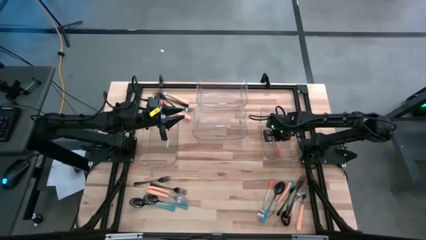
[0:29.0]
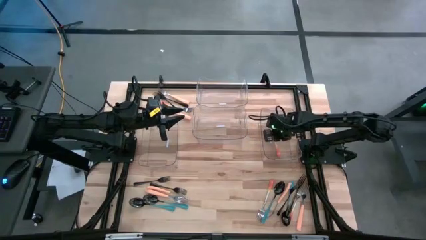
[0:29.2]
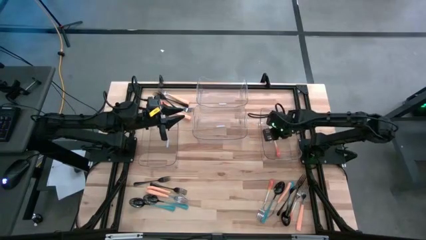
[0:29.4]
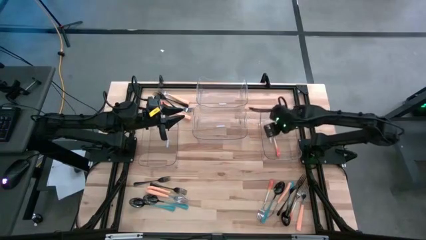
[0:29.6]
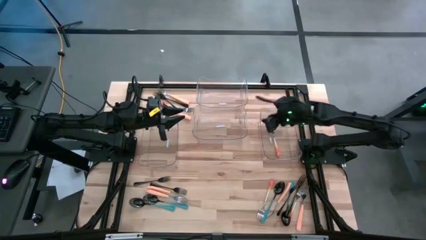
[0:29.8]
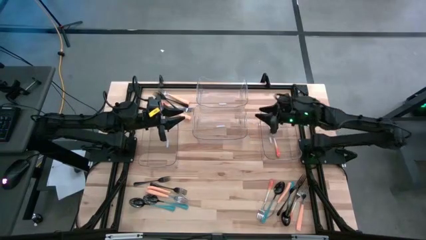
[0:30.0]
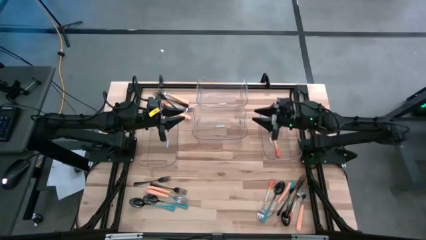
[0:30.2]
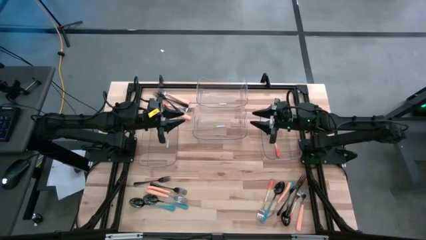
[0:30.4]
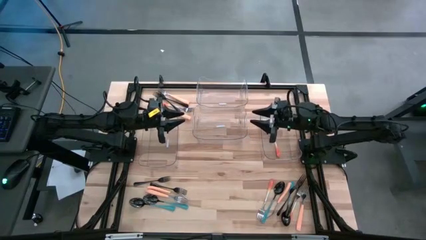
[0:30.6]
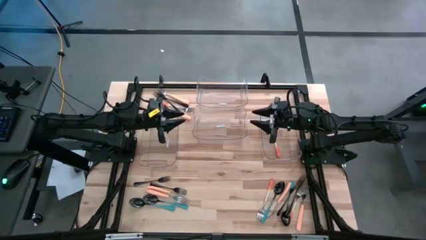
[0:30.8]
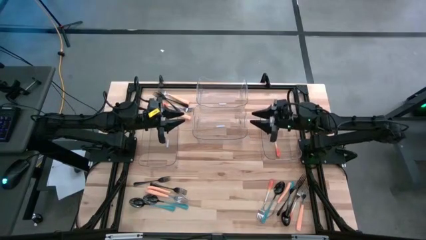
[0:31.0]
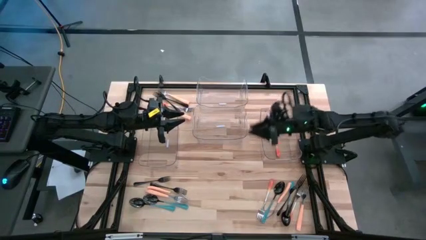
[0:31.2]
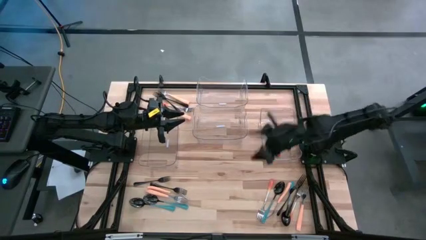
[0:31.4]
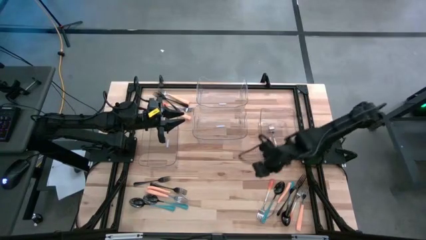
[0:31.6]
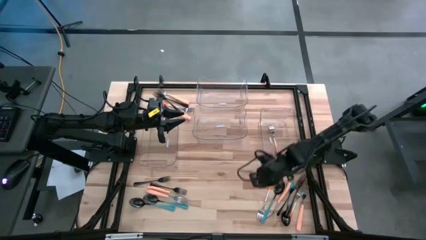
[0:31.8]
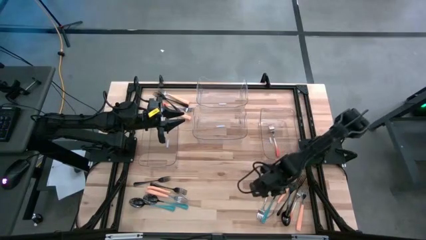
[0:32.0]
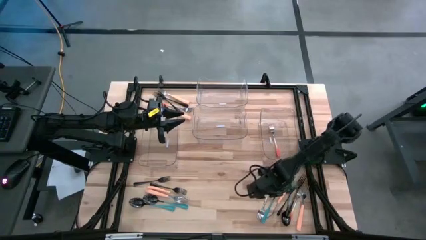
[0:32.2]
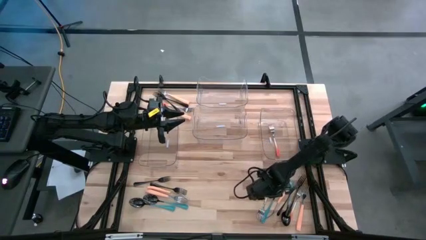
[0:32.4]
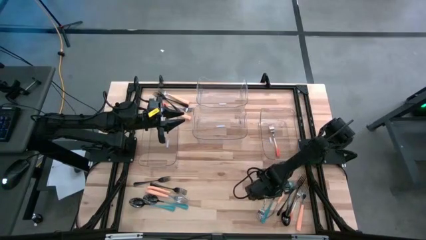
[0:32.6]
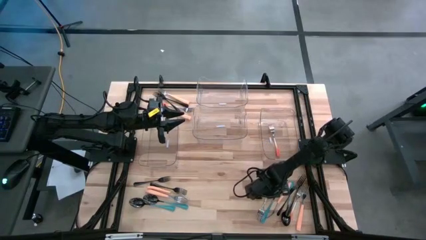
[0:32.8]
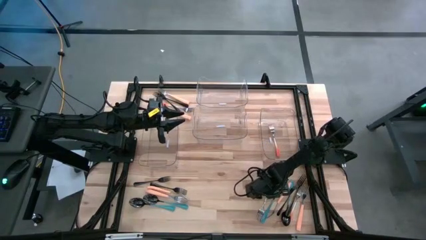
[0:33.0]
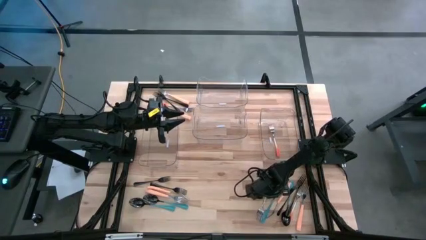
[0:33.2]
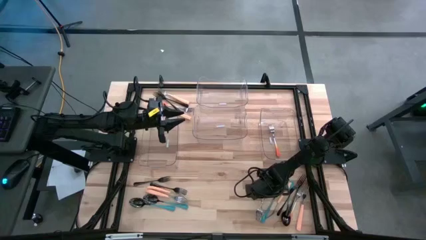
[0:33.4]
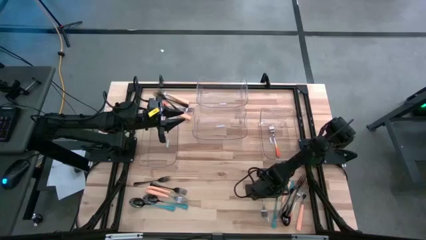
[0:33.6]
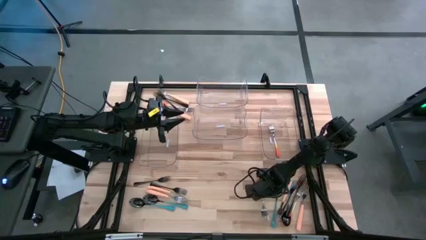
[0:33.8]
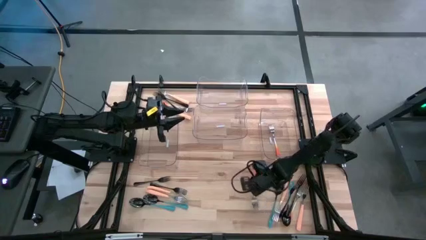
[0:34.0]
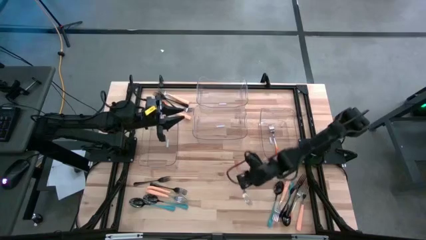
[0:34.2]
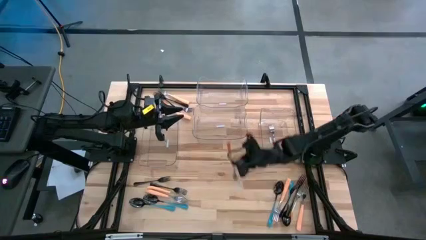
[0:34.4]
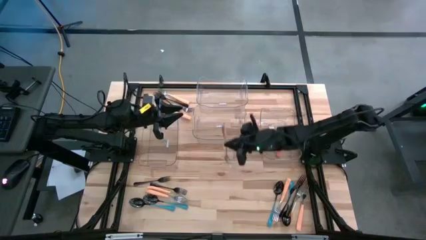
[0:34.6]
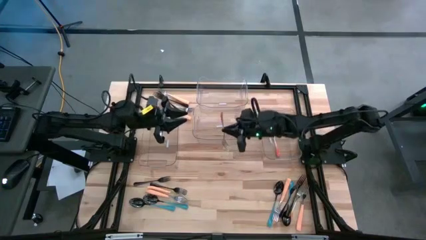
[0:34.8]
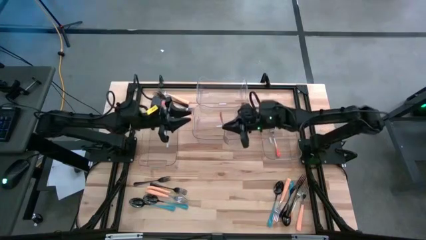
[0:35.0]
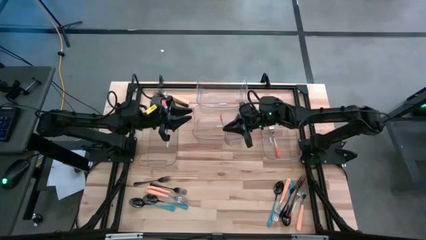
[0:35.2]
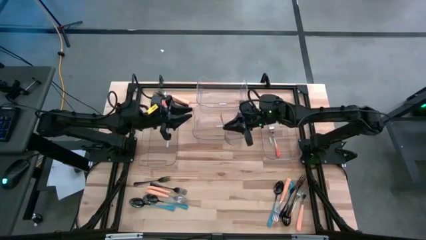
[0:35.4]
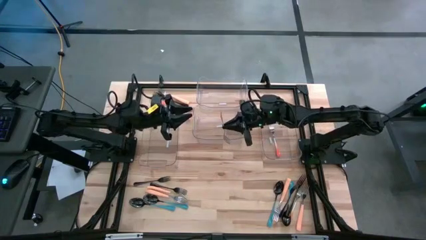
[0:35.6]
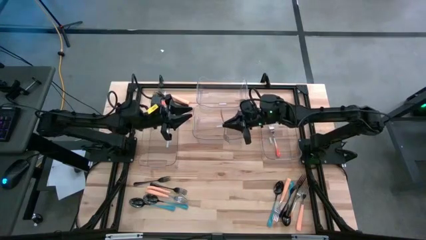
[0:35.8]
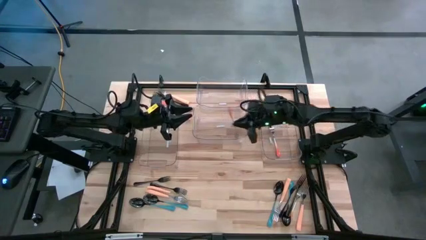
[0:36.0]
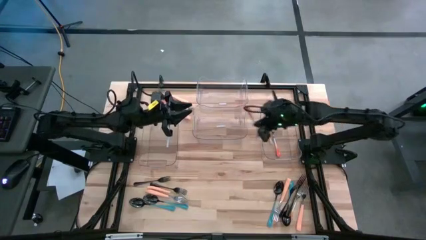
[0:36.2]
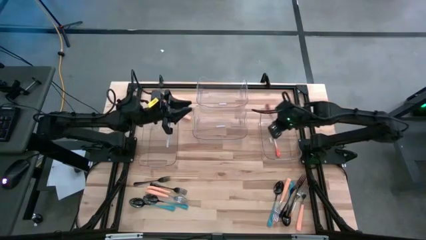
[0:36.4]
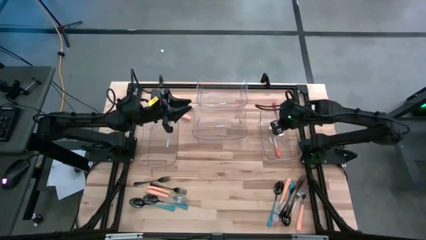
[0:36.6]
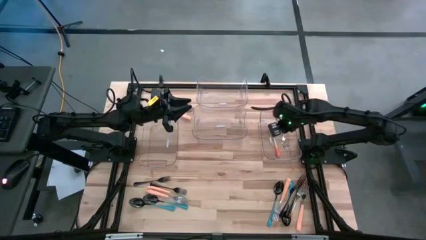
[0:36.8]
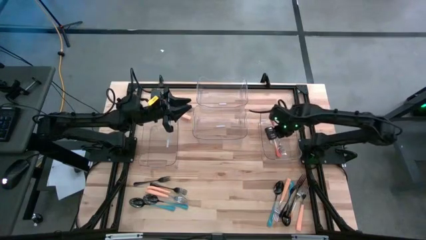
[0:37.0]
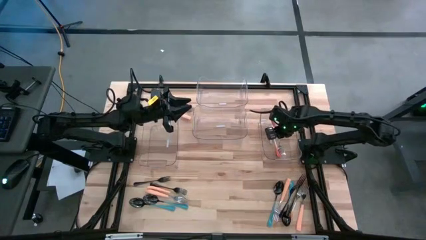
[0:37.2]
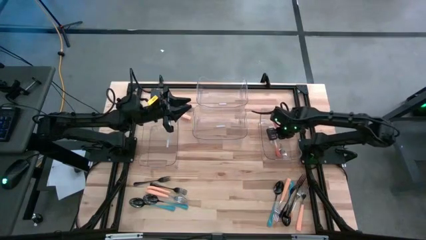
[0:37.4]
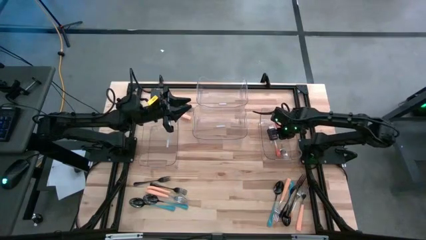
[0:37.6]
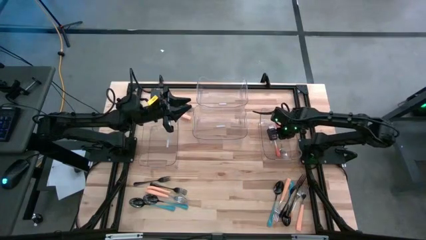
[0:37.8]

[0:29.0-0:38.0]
Task: Sort silverware by color (type)
Put the orange fork into the bottom right transparent bin

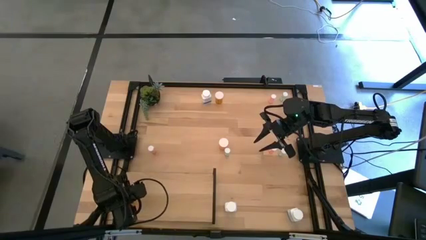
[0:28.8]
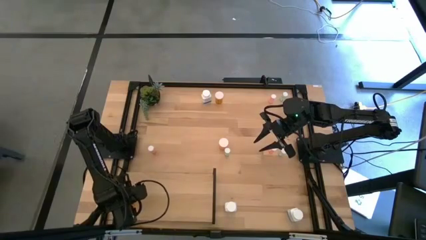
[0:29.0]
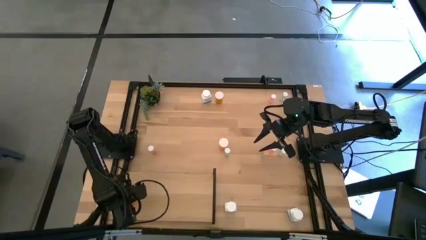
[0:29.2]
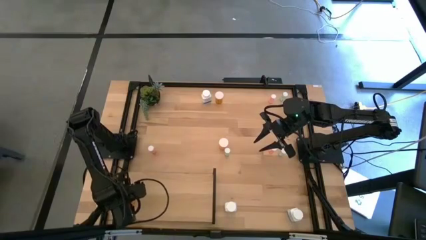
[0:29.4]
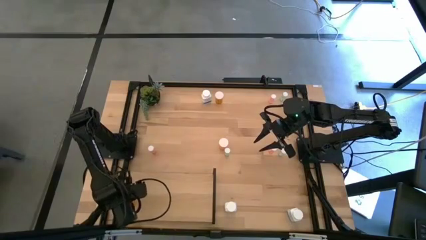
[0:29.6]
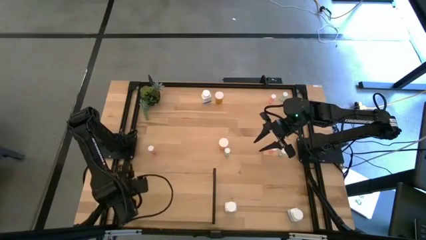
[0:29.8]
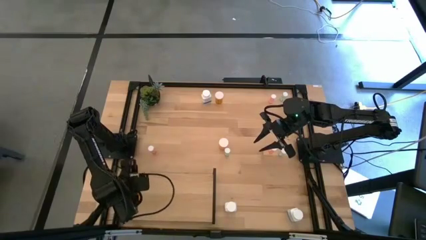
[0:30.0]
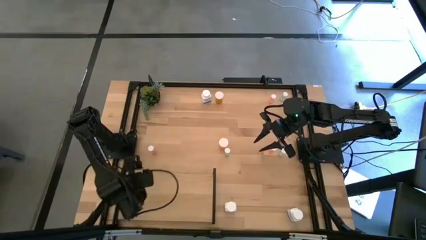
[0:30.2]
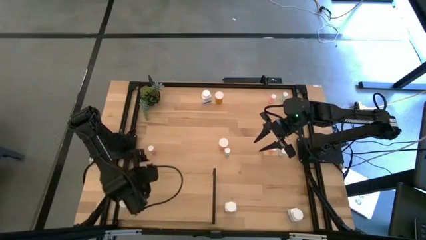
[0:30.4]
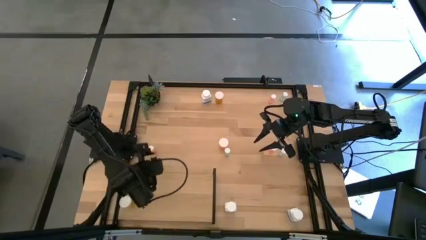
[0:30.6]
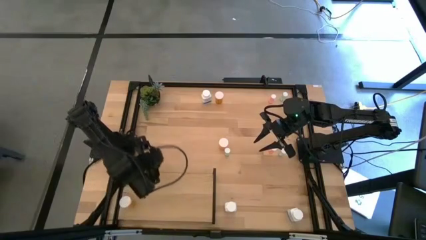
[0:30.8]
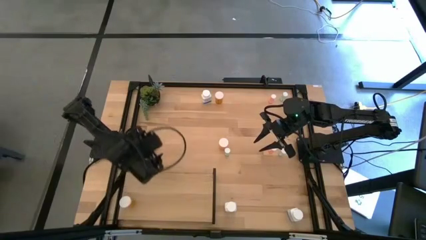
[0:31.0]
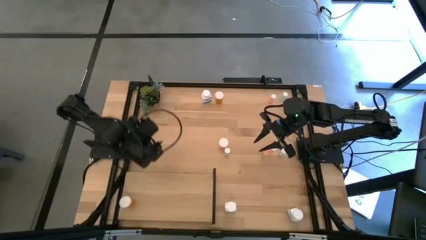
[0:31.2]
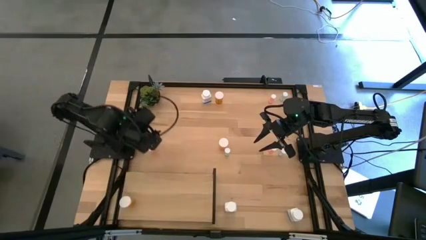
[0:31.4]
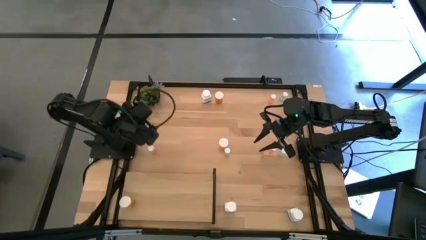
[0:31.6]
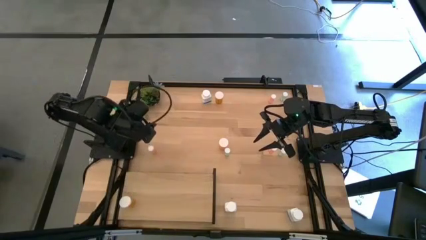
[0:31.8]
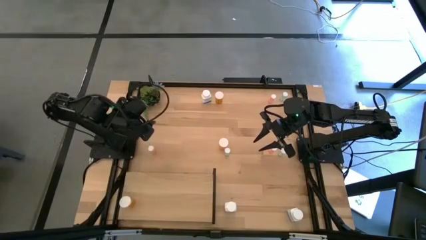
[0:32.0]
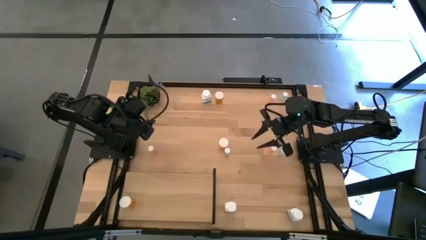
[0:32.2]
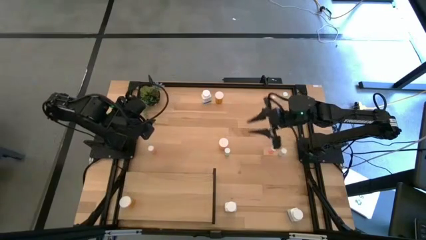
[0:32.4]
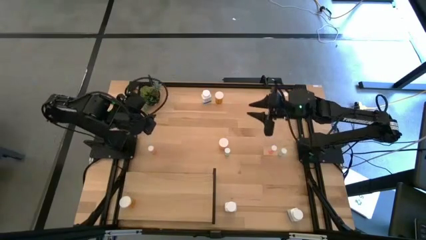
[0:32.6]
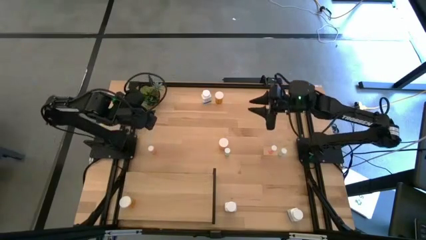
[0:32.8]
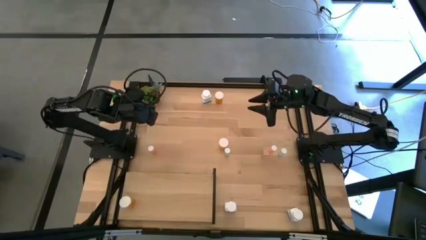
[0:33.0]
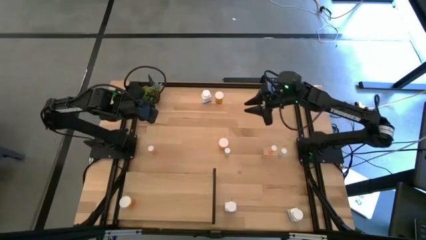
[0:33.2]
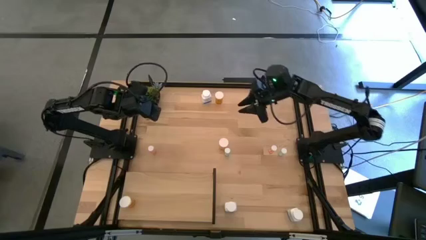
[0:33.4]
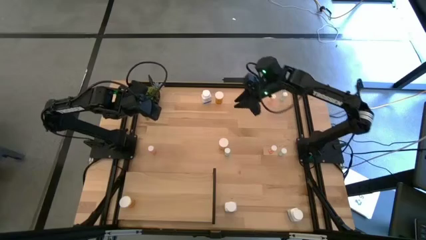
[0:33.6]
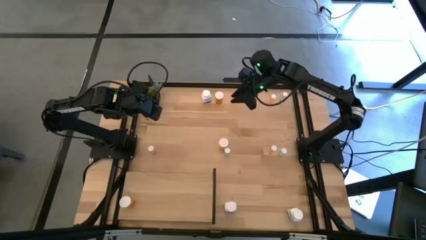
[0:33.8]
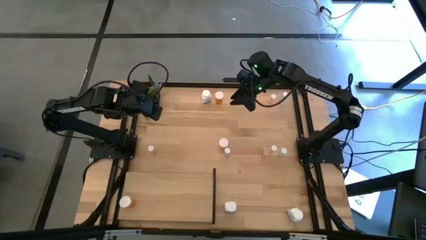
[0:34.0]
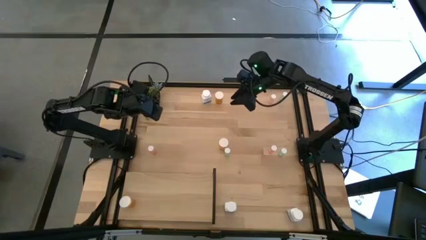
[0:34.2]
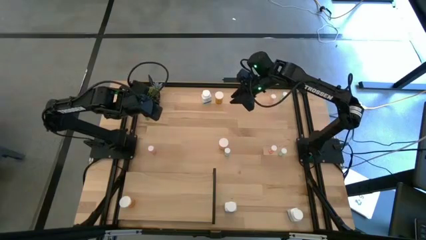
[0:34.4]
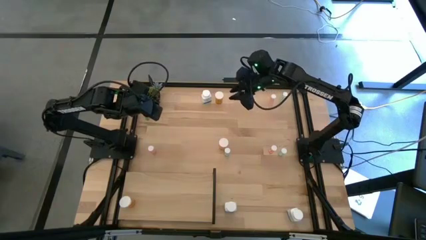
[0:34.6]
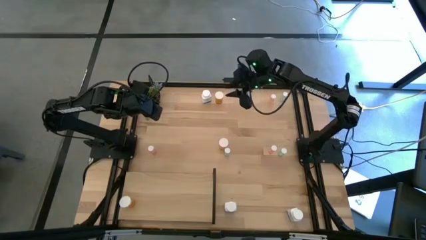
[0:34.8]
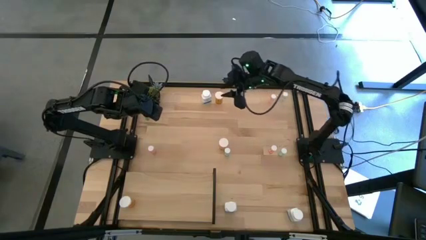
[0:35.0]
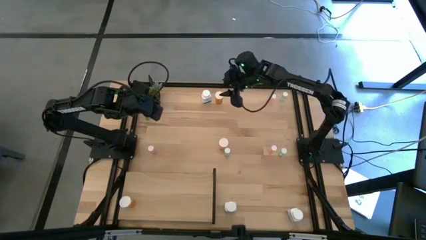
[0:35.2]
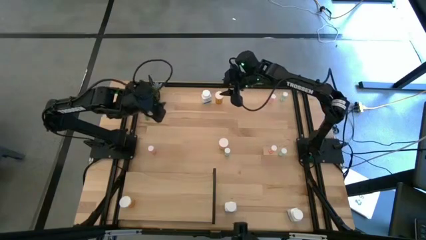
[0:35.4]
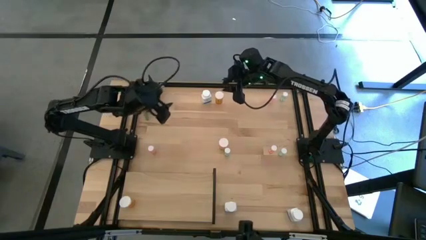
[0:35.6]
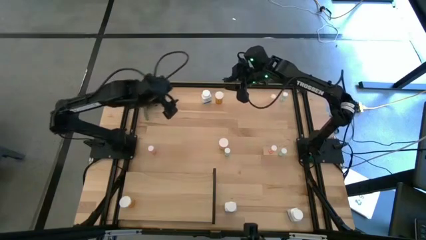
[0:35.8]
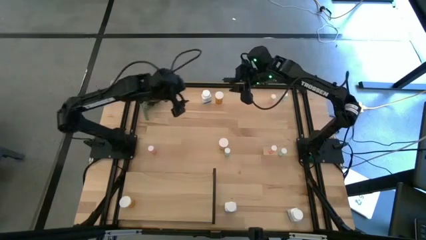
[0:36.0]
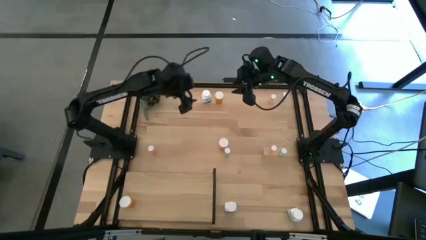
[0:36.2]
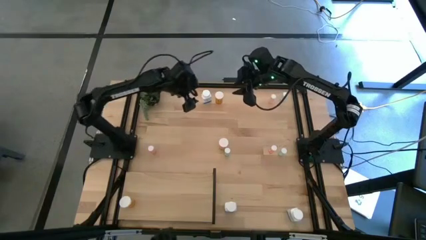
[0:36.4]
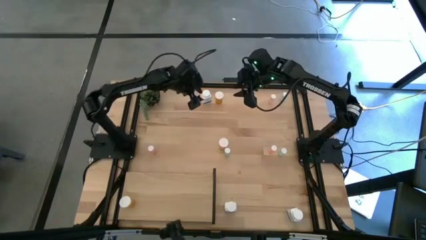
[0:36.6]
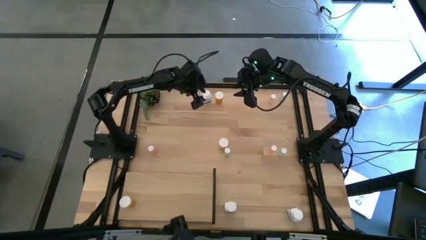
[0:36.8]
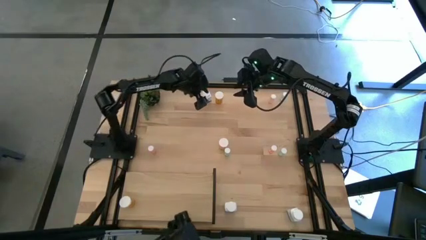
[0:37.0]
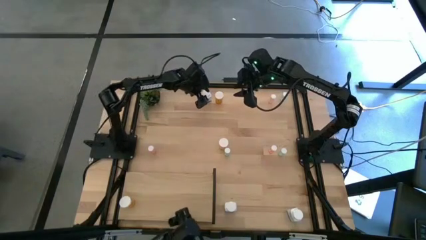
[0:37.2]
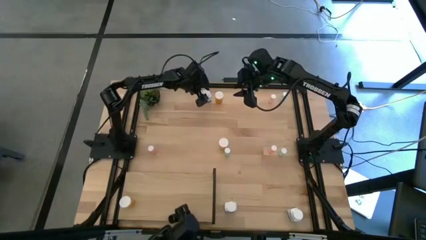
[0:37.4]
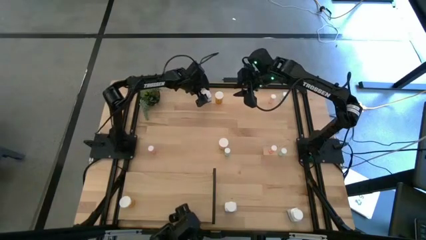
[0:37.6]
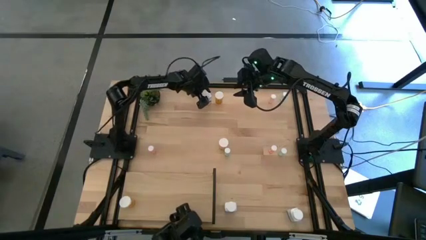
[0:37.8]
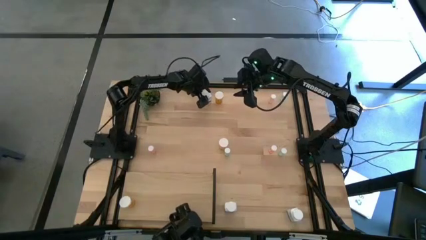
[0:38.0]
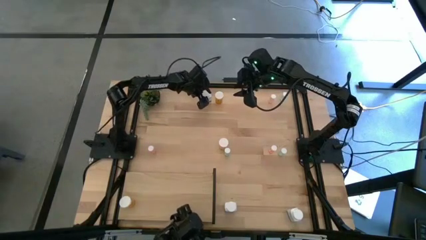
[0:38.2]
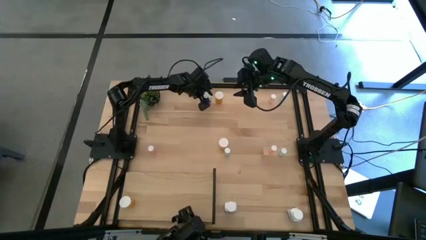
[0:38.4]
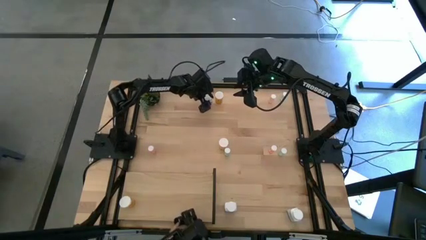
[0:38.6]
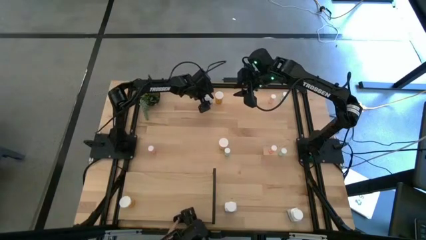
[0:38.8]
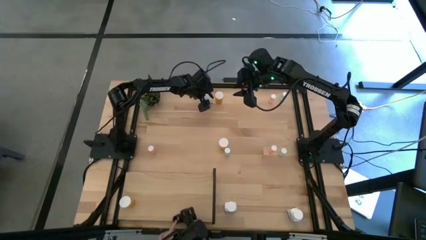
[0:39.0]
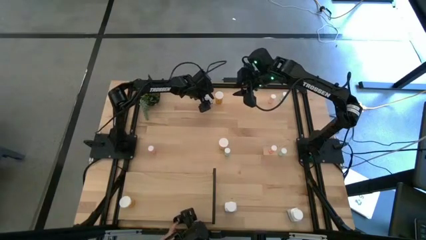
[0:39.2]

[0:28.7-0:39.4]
Task: Pick and place medicine bottles onto shelf by color
Put the top big white pill bottle on the shelf
